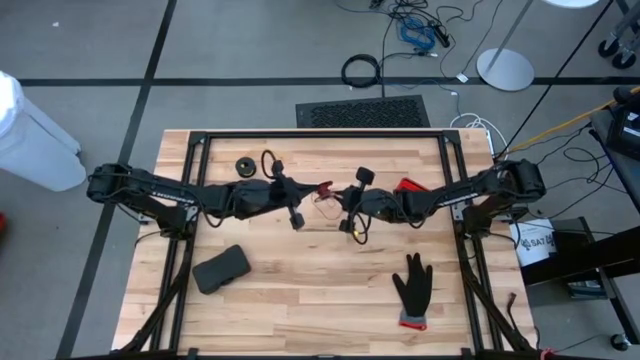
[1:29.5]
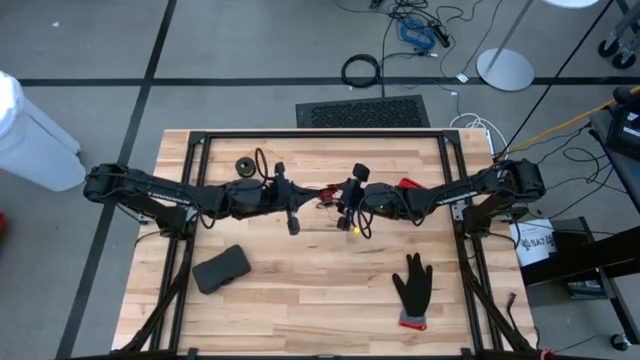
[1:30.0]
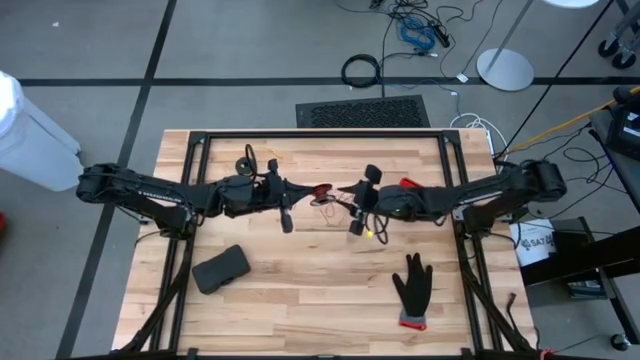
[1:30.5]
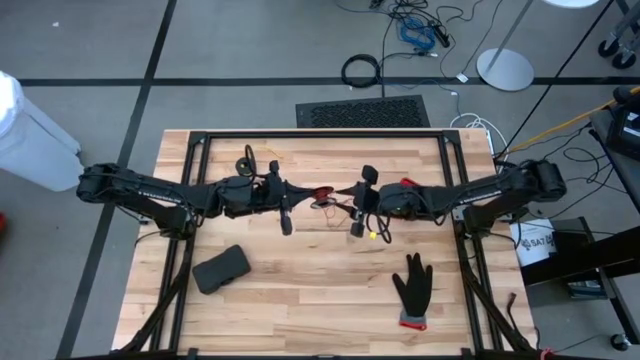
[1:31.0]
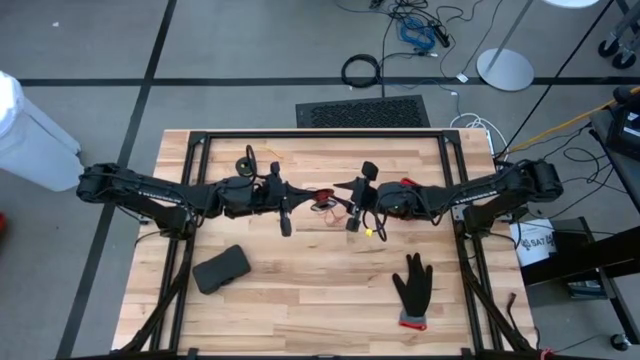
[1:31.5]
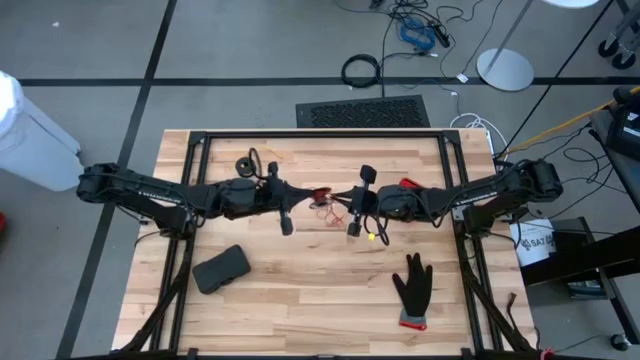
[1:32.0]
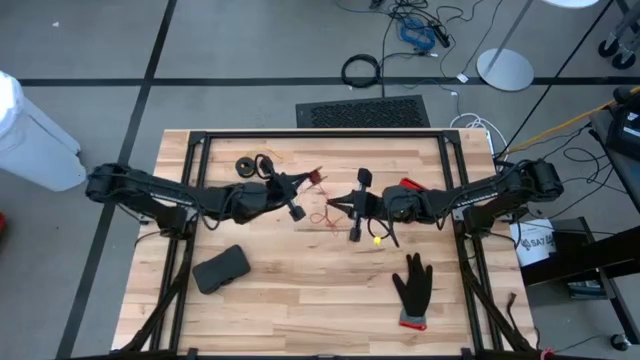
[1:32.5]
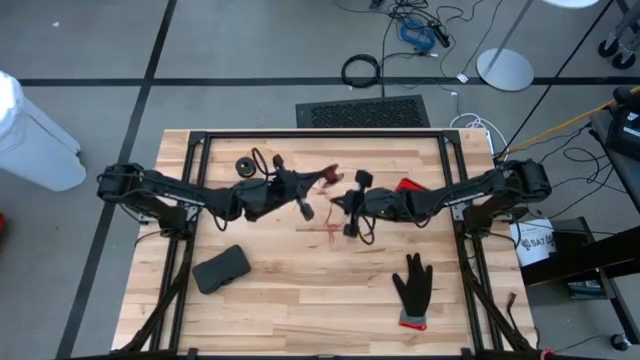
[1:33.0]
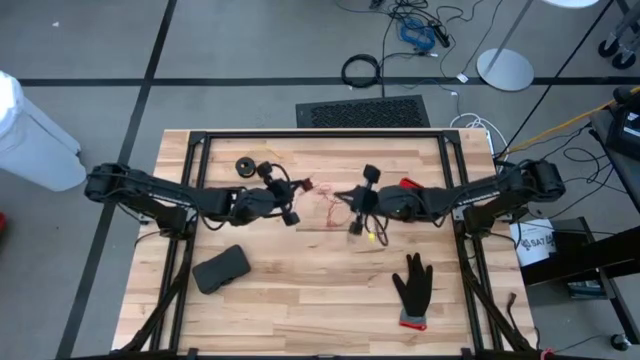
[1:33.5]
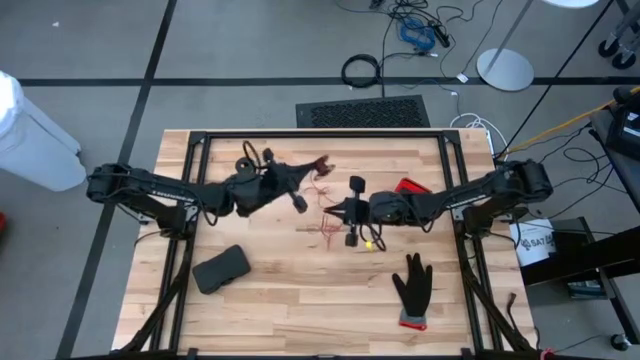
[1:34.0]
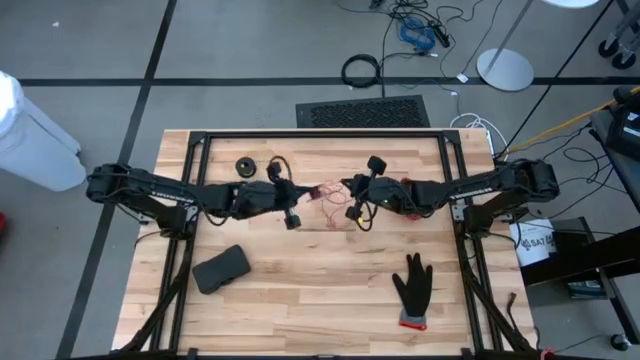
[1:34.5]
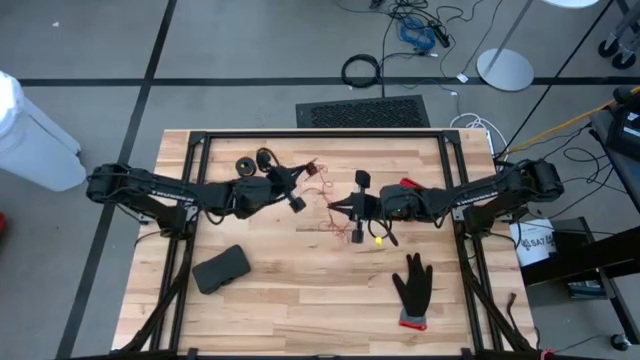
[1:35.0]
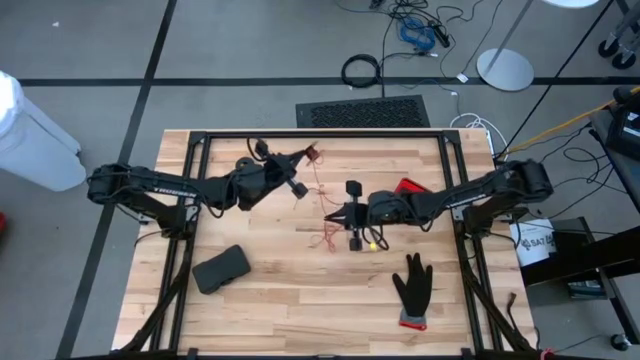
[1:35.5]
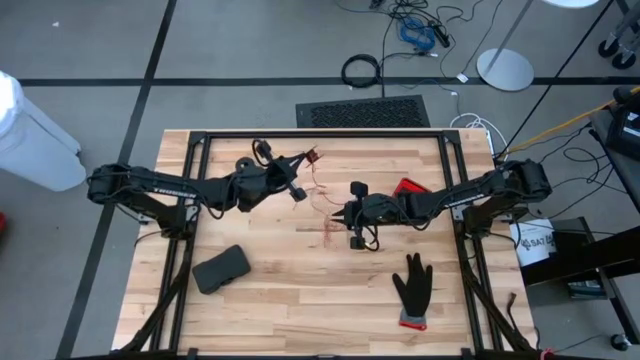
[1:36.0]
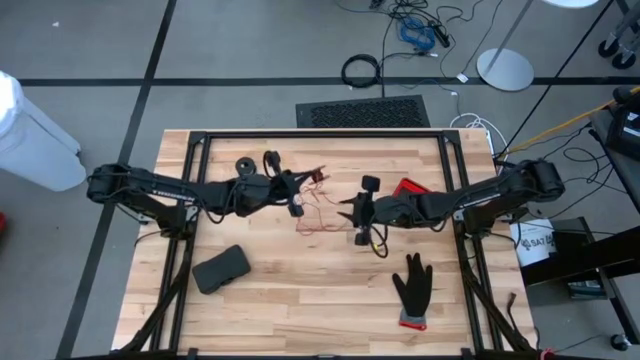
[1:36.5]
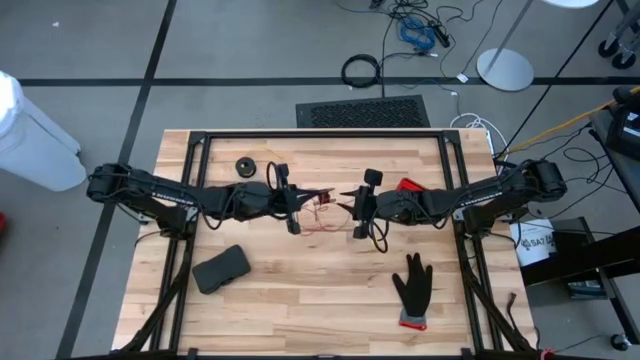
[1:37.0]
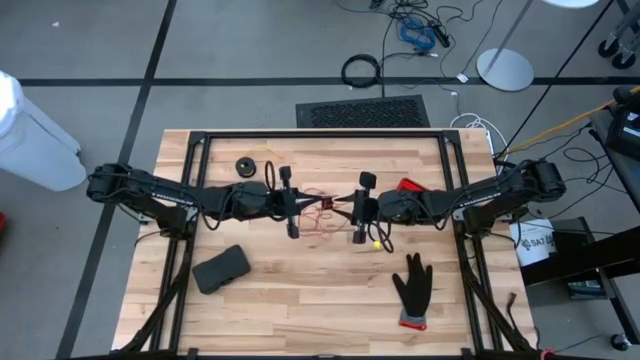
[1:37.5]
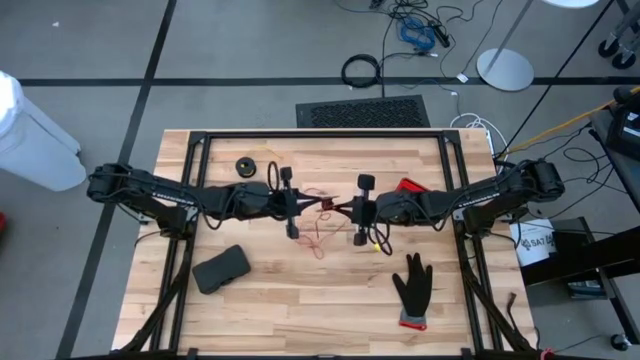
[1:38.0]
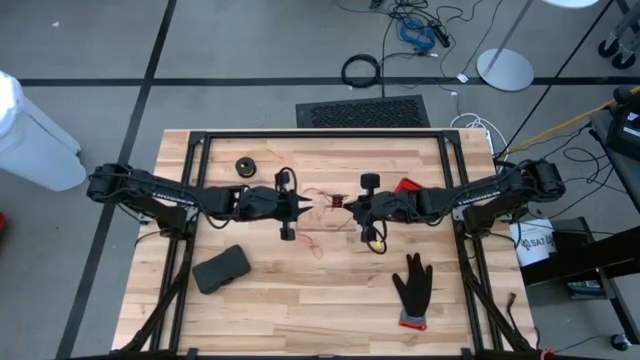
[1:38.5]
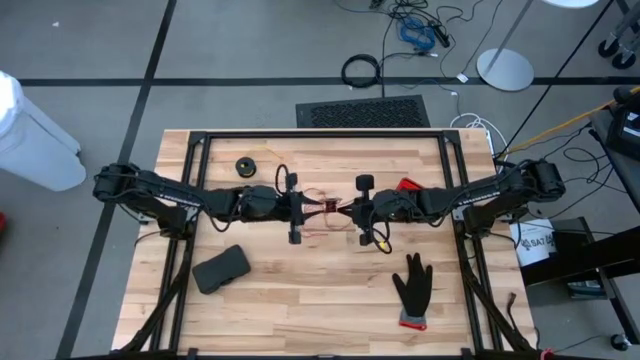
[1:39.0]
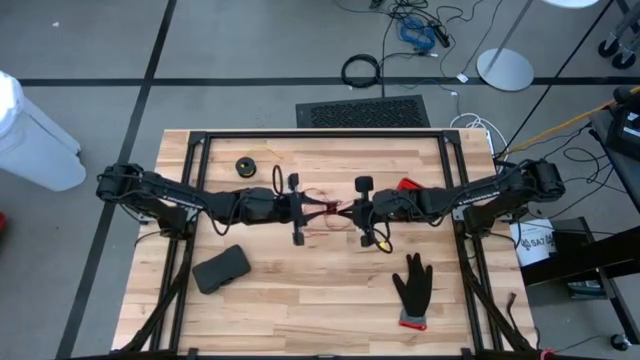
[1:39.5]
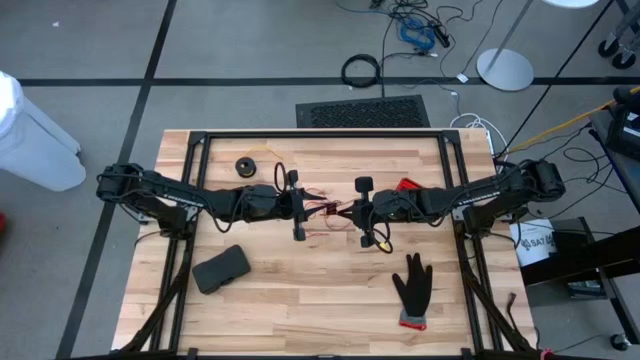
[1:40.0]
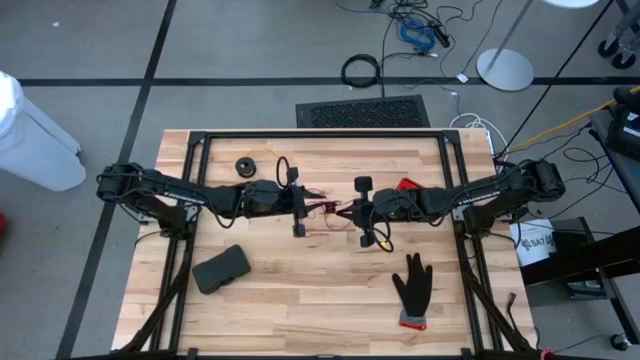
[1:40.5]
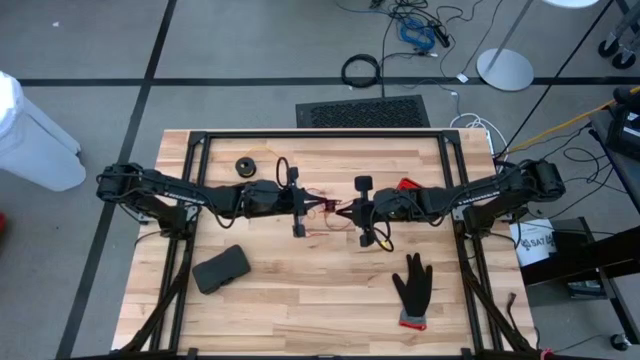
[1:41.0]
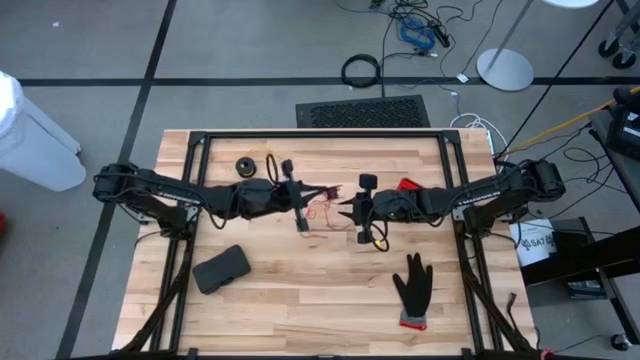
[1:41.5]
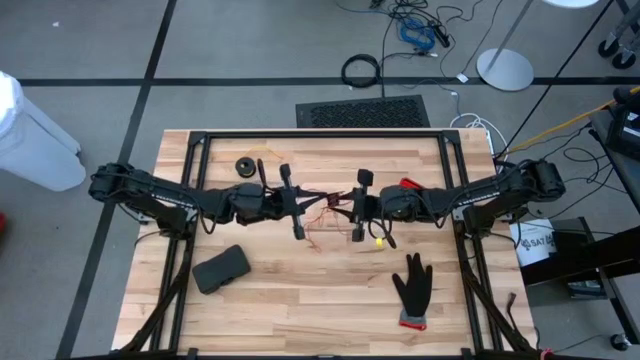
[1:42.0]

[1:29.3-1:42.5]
Task: Coil cords
Uncoil the red wire from the black spool

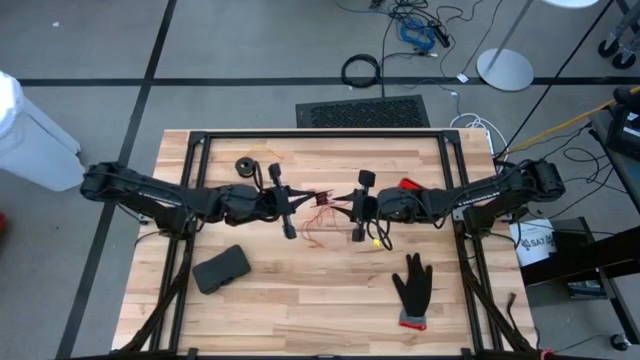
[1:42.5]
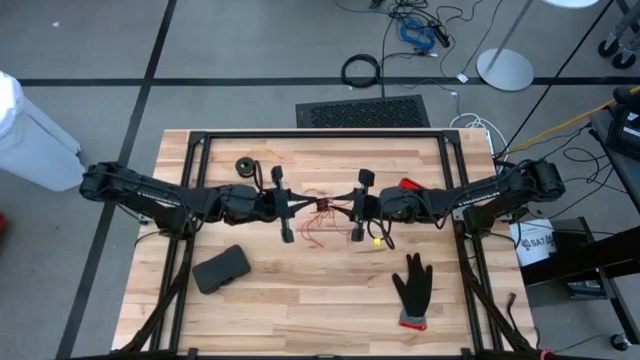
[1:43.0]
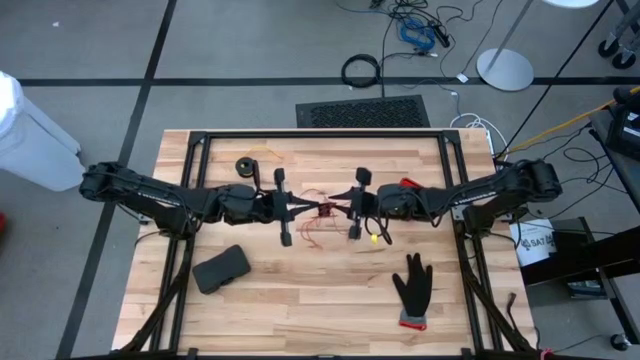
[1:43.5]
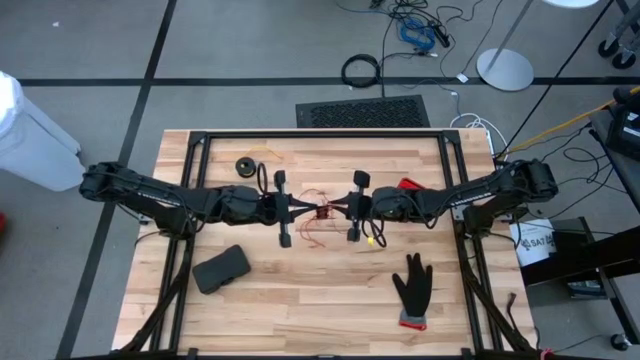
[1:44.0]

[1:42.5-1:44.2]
Uncoil the red wire from the black spool

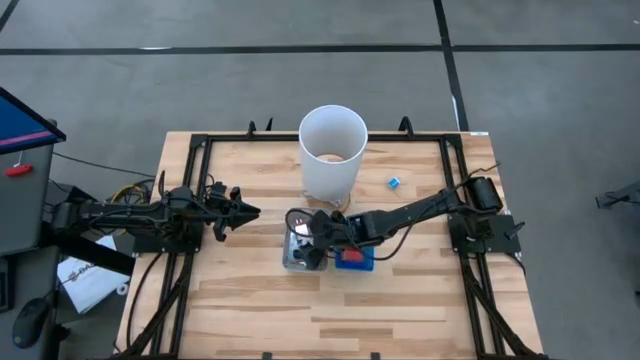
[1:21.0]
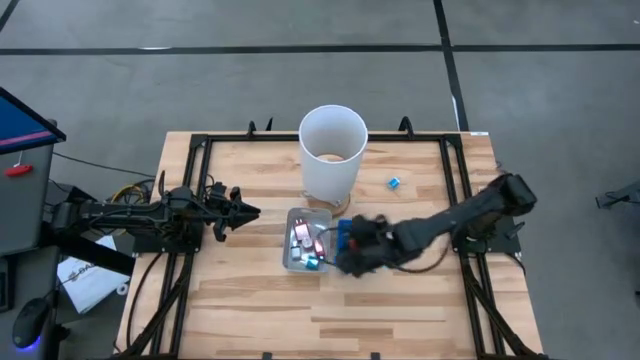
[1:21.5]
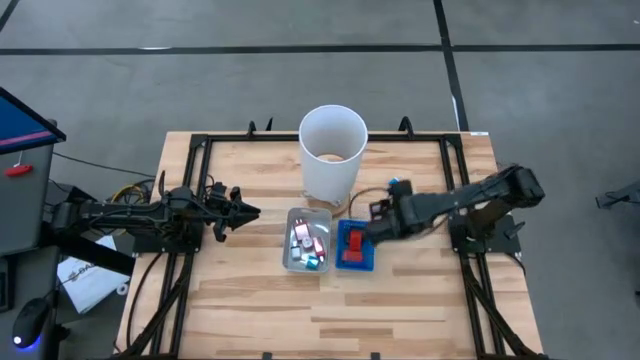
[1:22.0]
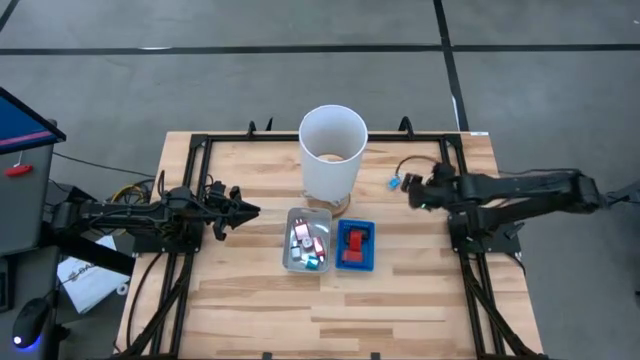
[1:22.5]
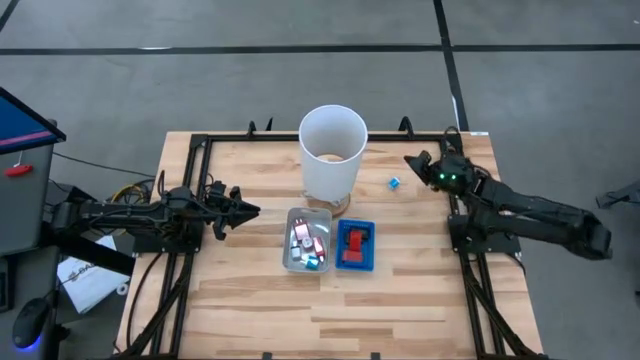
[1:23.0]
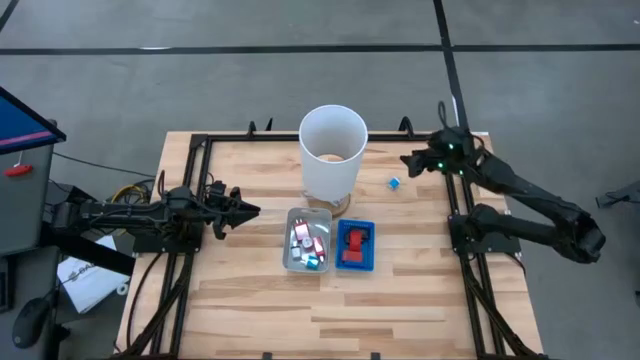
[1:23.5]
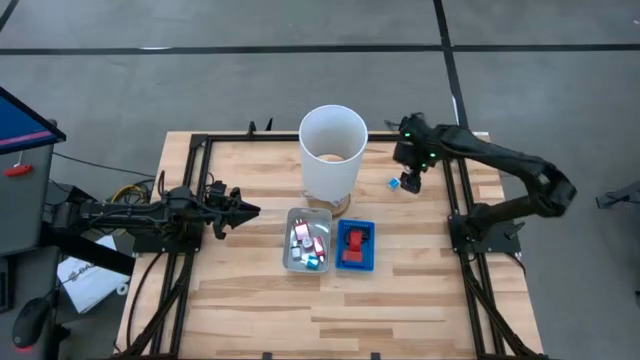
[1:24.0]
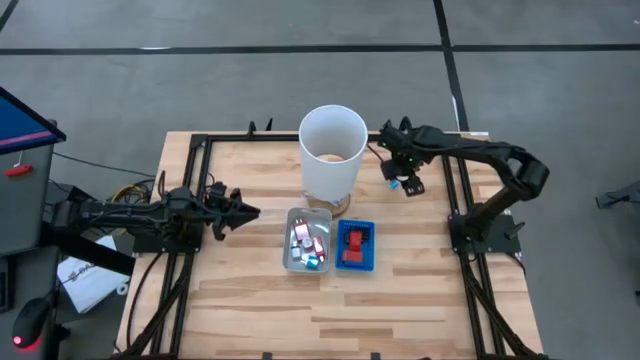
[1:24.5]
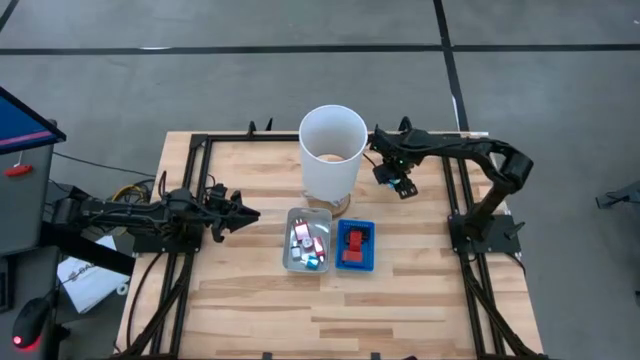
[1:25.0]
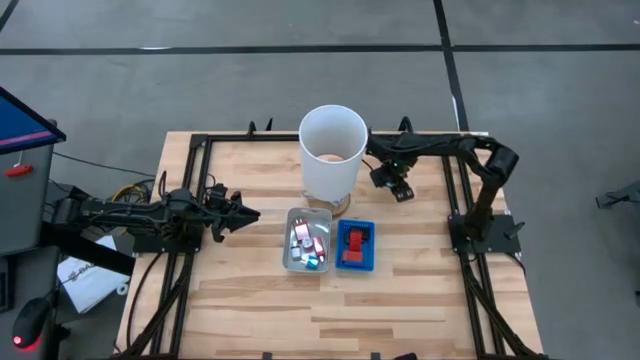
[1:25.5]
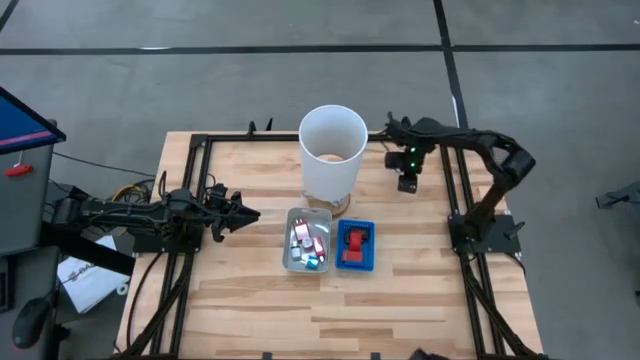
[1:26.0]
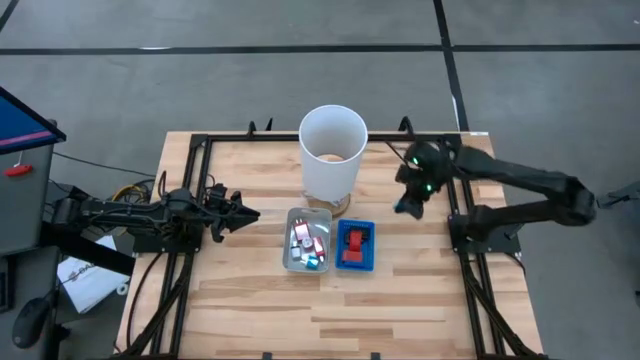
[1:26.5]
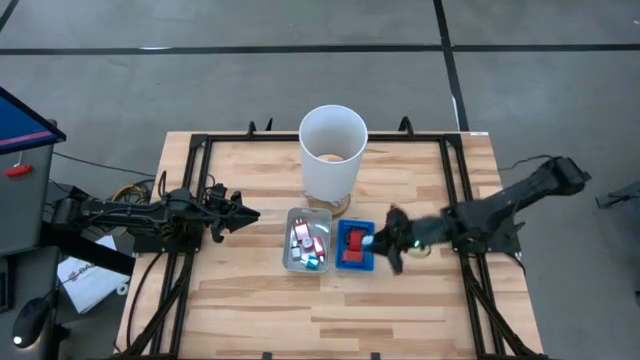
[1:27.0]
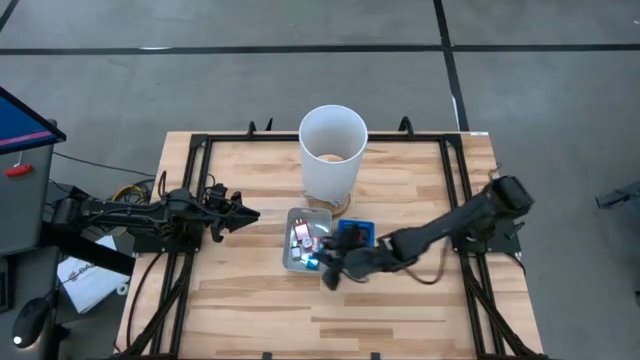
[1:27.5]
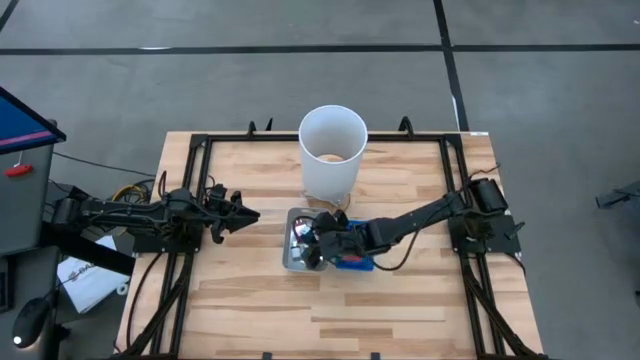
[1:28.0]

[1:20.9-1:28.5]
Task: Pick & Place Office items
Put the blue charger adapter into the gray bin

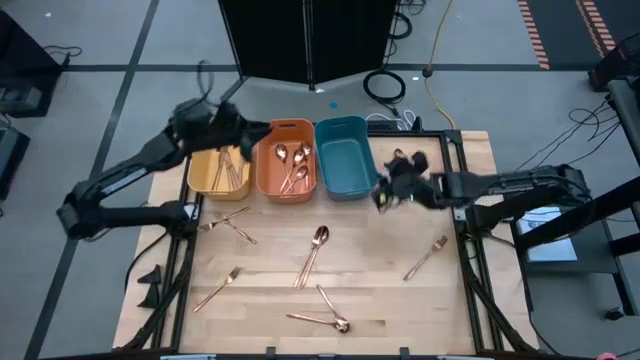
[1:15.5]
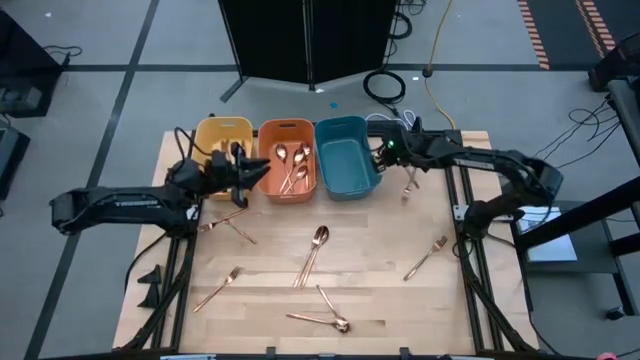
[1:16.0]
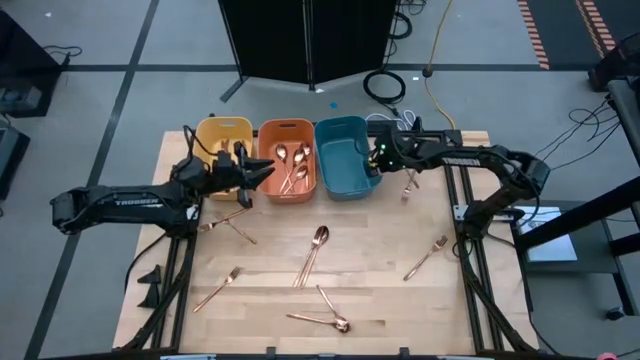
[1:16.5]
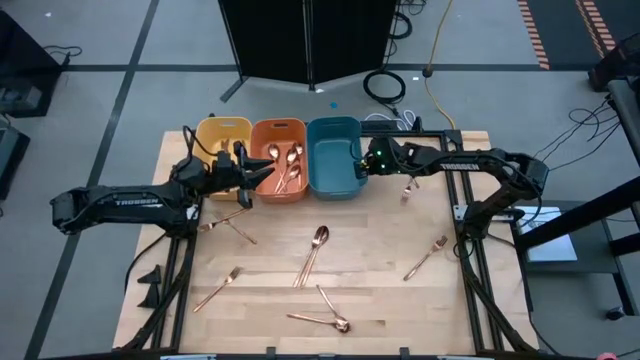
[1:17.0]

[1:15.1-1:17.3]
Task: Sort silverware
Adjust the blue bin
